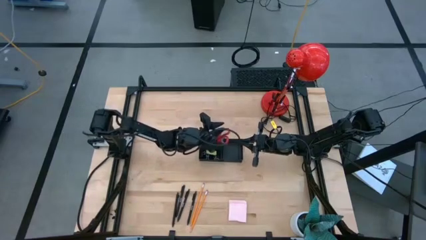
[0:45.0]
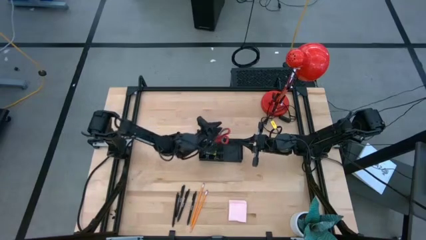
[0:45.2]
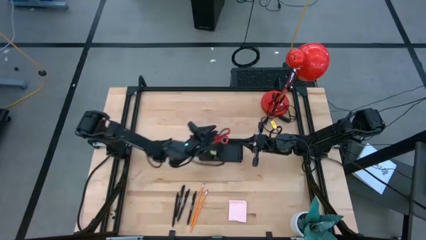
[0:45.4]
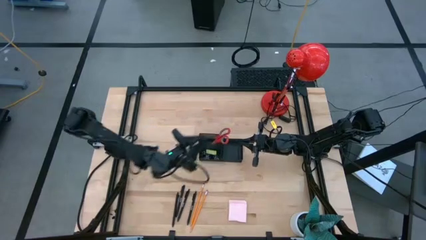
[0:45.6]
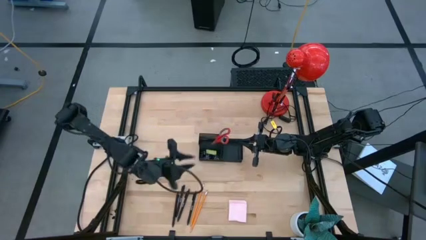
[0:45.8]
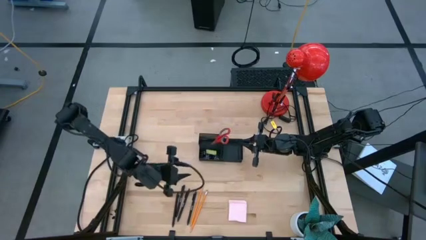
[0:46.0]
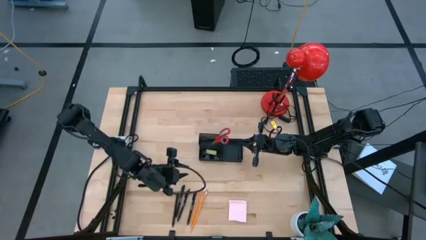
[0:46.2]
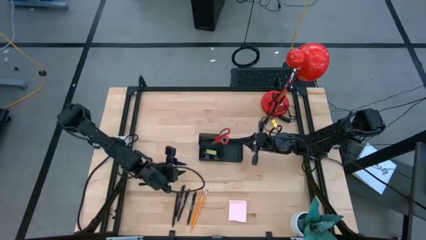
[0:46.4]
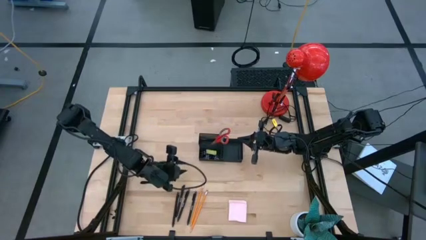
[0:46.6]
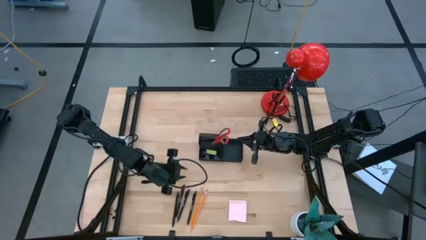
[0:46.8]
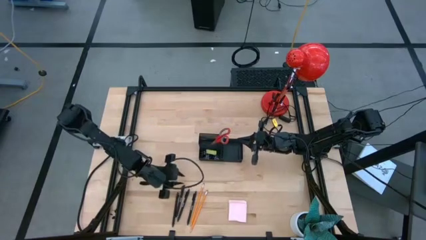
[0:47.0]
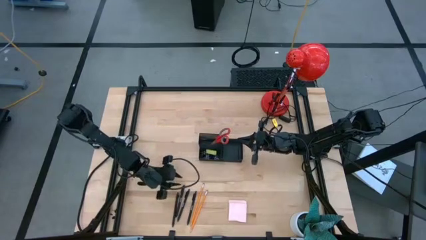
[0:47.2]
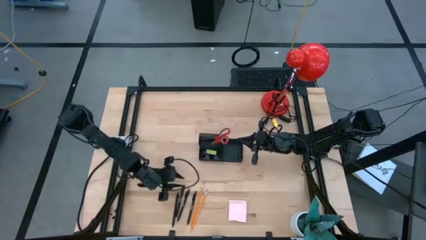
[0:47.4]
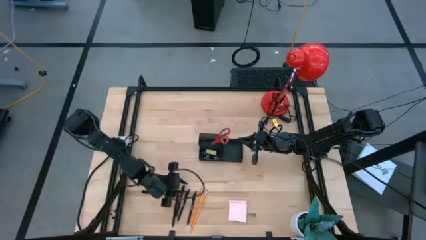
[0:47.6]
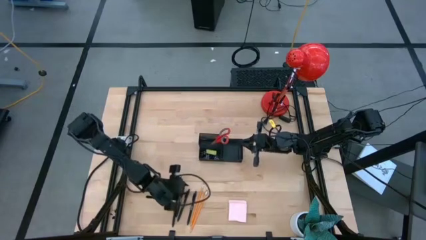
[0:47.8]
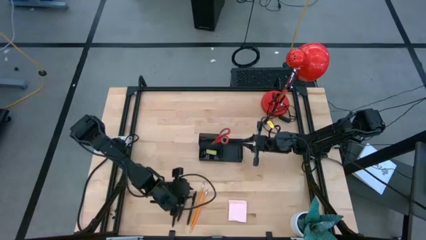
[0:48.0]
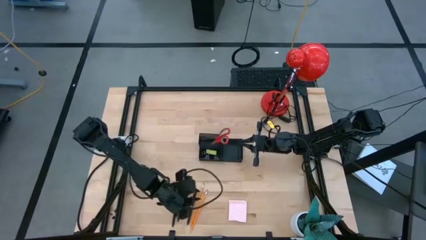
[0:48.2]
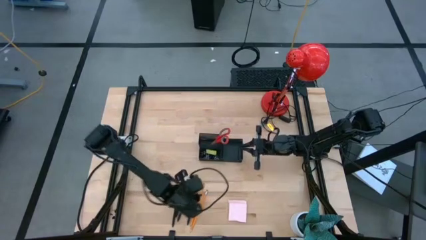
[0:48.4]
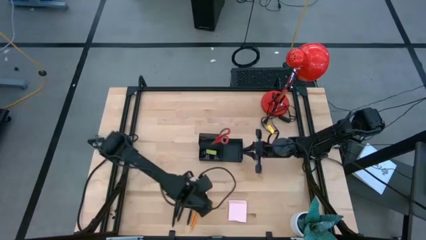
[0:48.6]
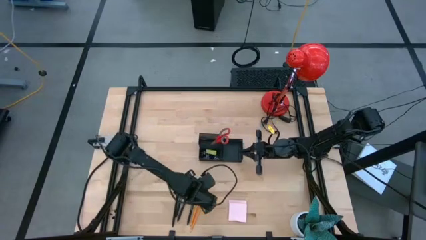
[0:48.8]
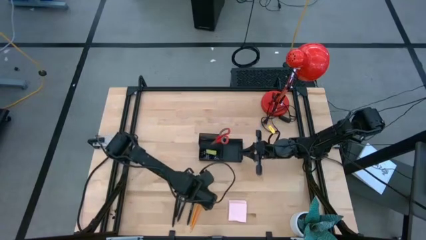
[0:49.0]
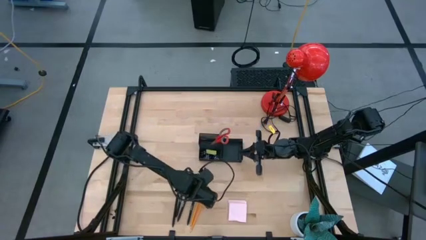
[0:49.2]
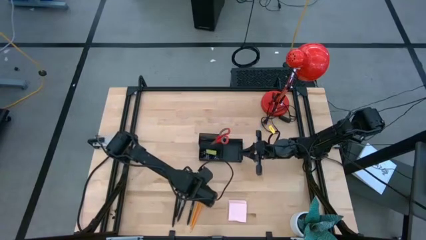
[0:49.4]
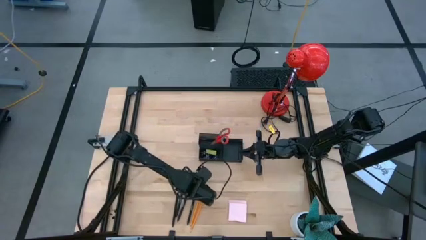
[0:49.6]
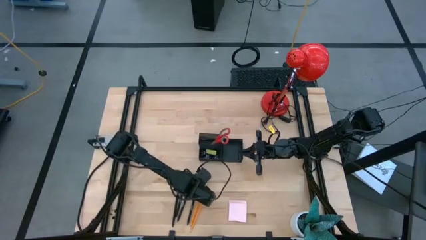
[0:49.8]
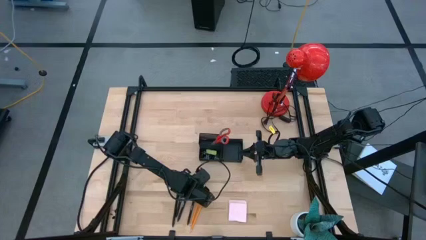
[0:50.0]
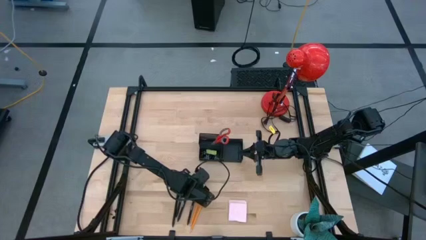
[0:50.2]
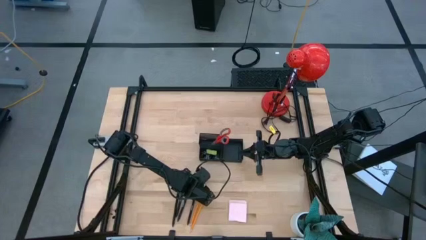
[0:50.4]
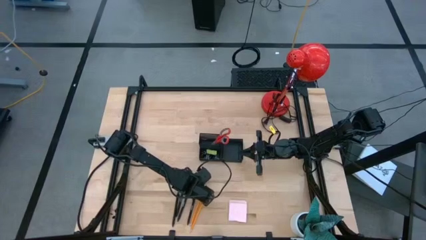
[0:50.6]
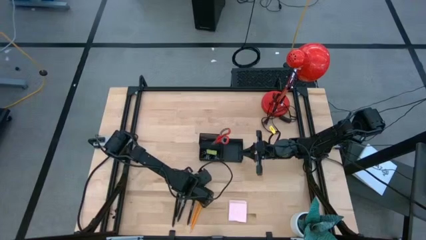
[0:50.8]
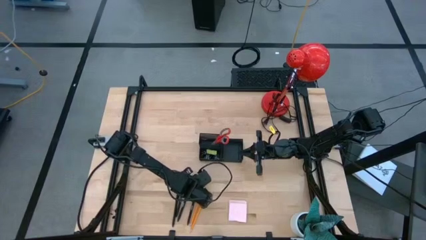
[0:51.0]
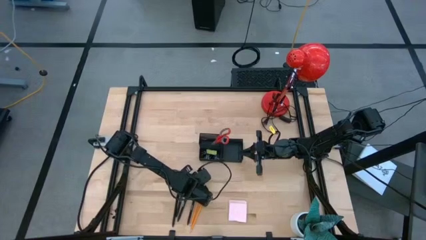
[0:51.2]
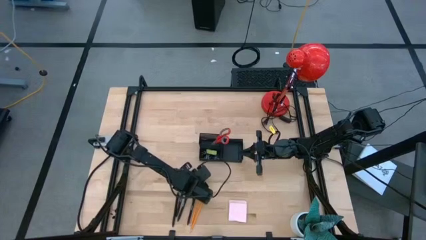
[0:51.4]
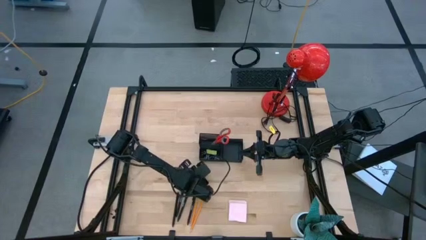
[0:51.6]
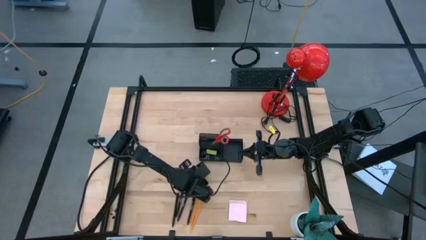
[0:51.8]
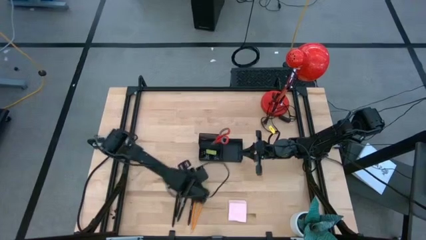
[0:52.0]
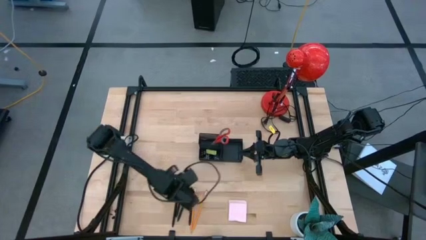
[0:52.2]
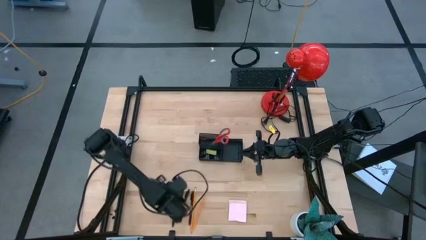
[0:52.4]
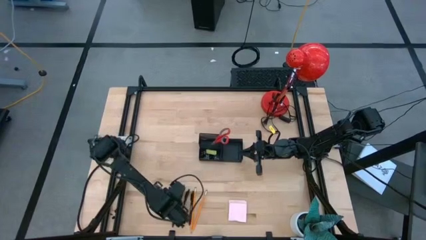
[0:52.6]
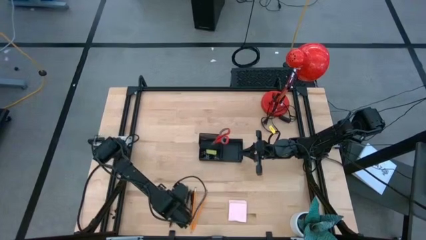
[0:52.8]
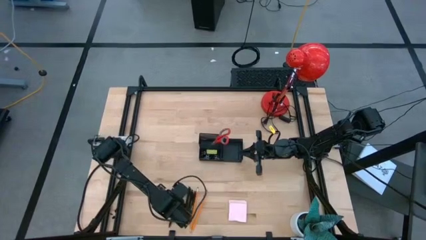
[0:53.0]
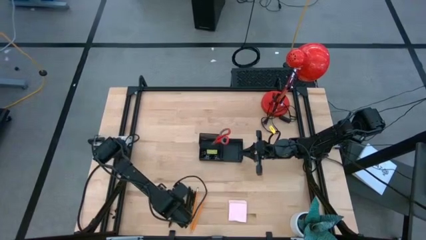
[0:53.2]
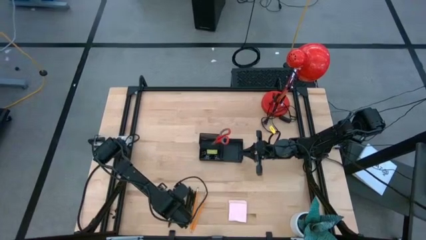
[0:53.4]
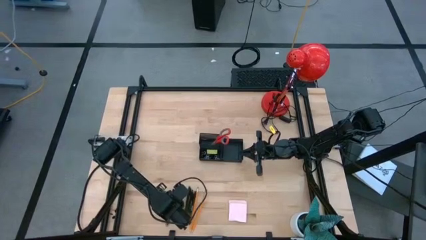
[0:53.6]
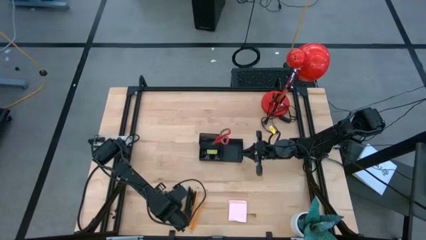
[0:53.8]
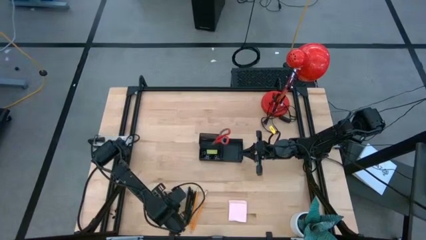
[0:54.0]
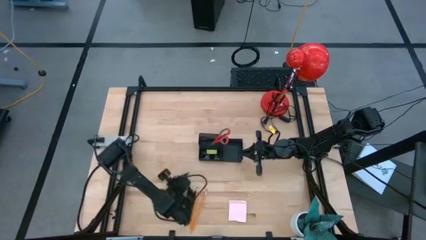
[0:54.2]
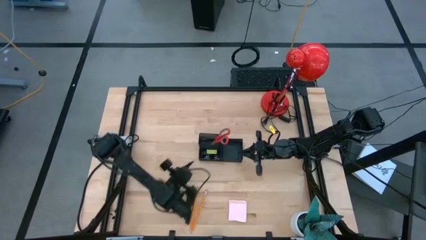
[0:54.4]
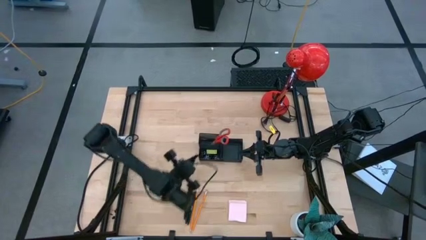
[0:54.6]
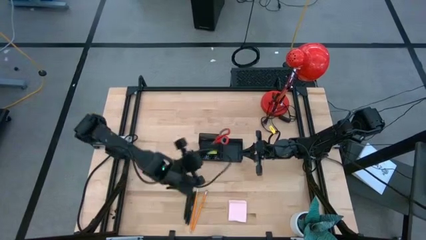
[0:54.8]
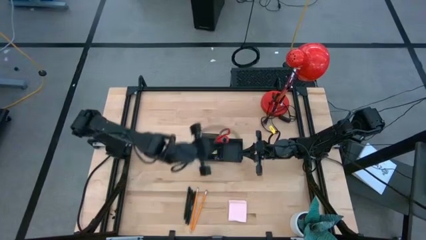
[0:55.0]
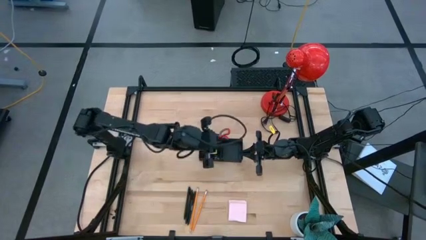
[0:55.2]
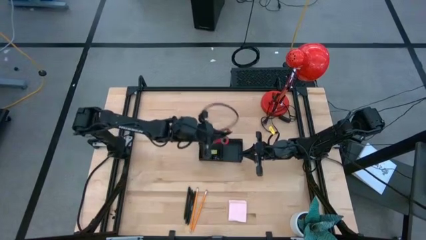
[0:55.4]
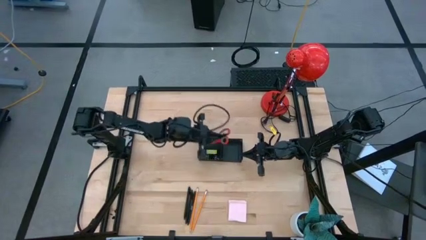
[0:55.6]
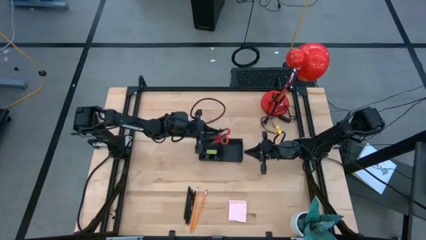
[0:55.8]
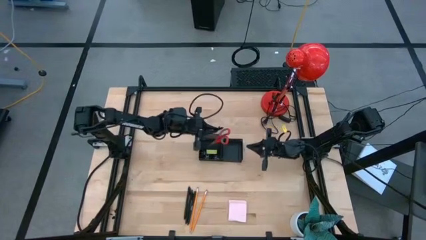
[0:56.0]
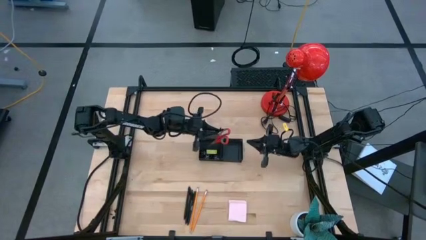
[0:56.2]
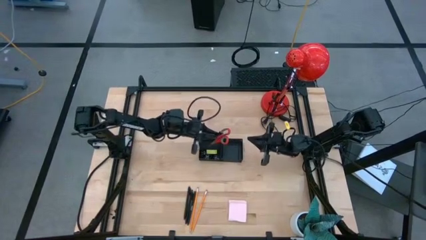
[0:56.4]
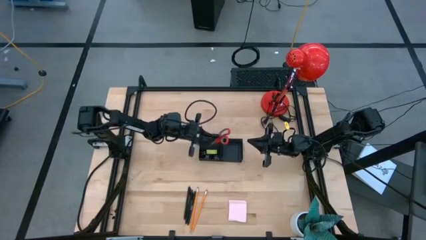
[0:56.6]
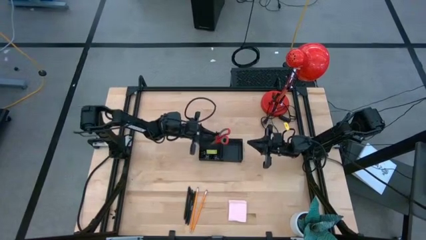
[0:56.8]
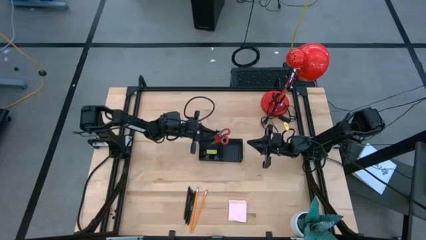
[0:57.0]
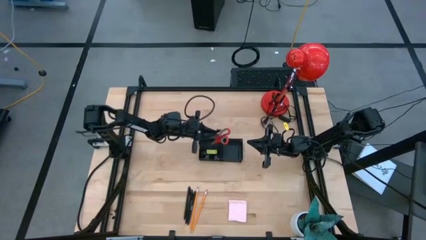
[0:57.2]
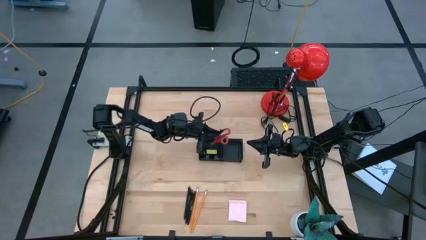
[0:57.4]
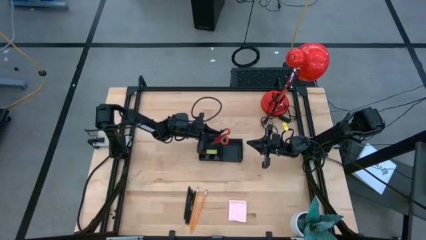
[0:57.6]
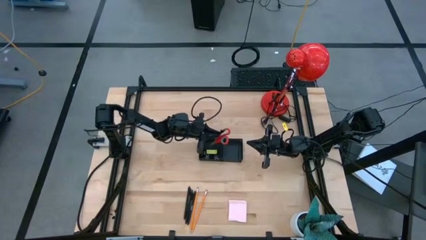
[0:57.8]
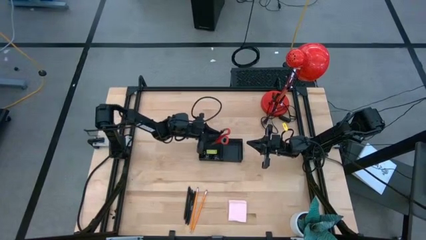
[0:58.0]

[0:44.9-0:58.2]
Task: Pick and place office supplies into organizer
Put the black pen into the black desk organizer

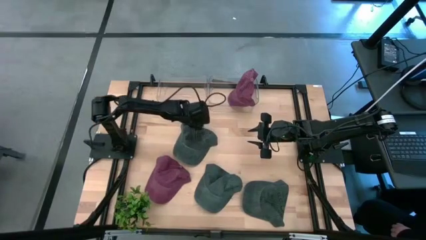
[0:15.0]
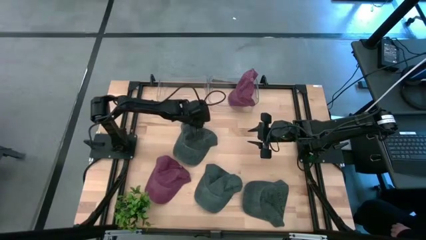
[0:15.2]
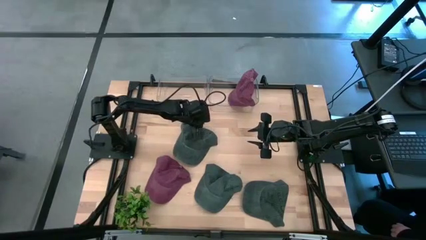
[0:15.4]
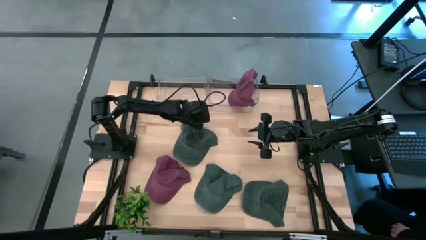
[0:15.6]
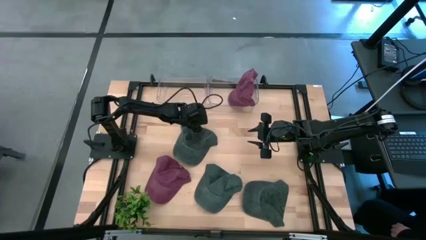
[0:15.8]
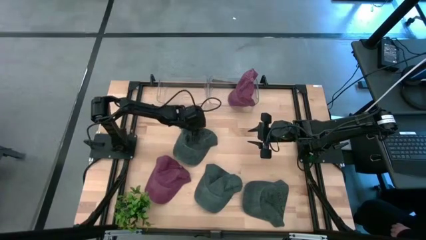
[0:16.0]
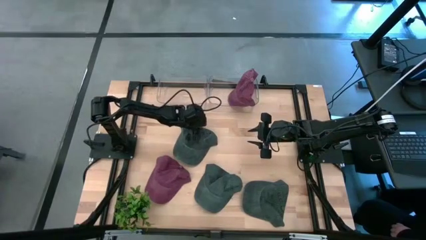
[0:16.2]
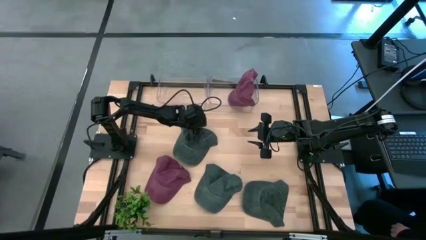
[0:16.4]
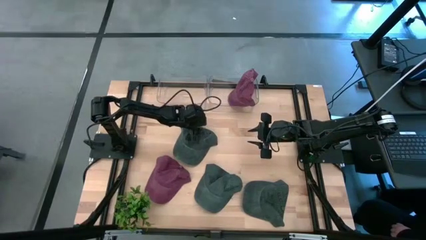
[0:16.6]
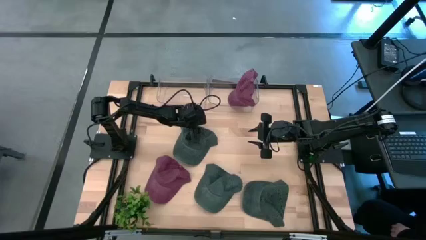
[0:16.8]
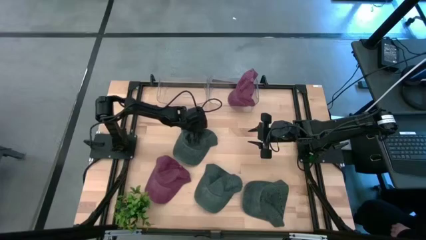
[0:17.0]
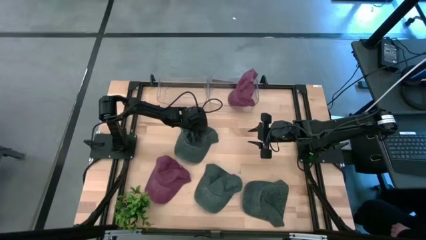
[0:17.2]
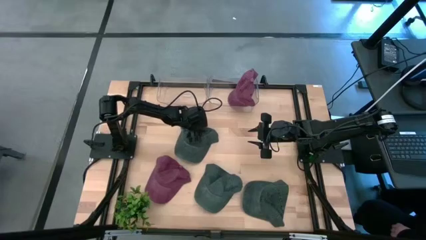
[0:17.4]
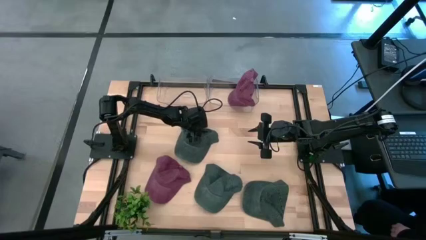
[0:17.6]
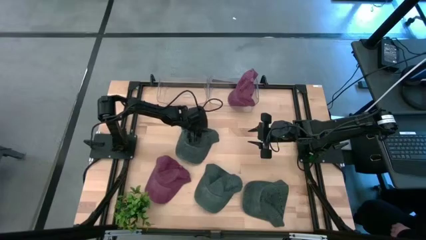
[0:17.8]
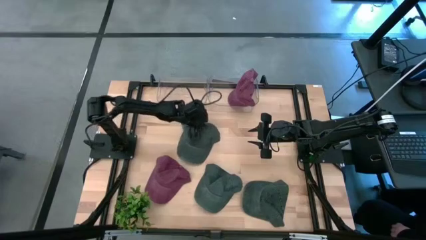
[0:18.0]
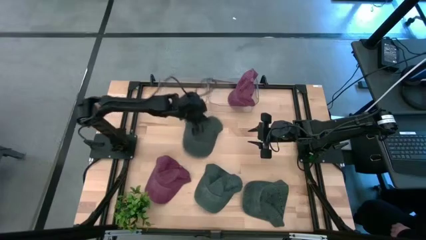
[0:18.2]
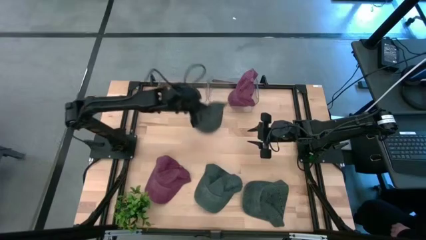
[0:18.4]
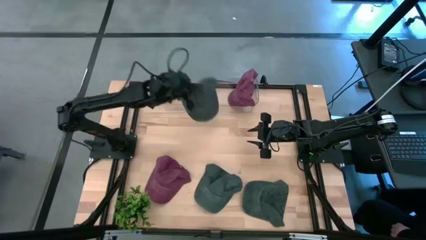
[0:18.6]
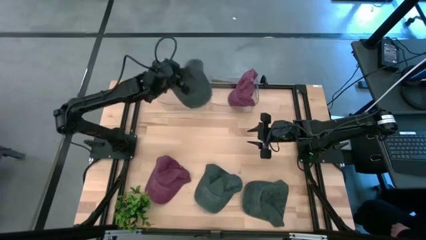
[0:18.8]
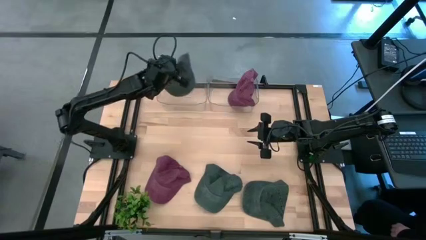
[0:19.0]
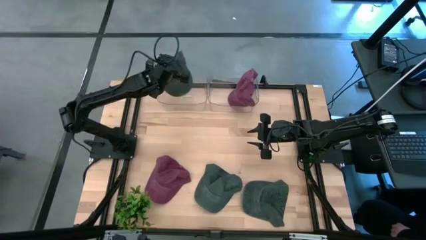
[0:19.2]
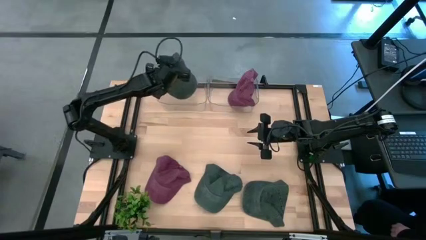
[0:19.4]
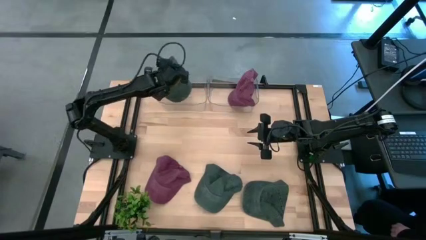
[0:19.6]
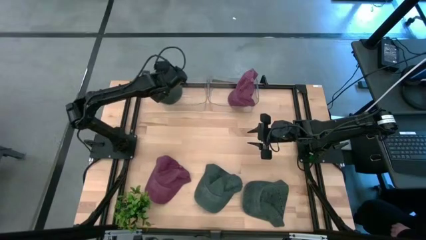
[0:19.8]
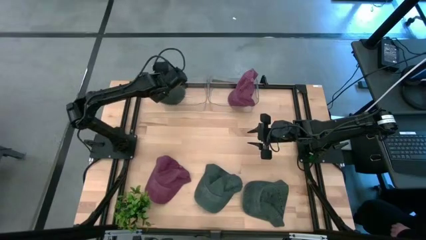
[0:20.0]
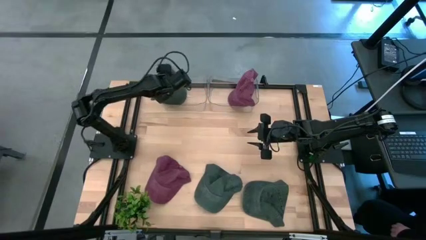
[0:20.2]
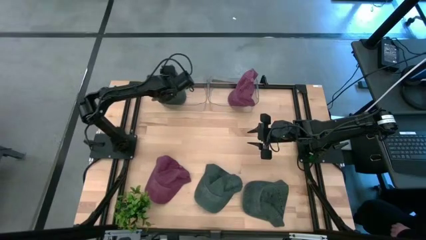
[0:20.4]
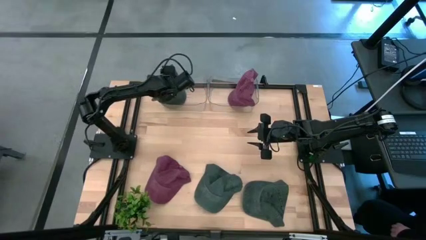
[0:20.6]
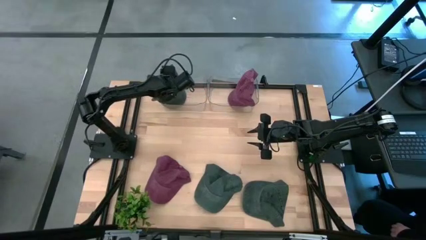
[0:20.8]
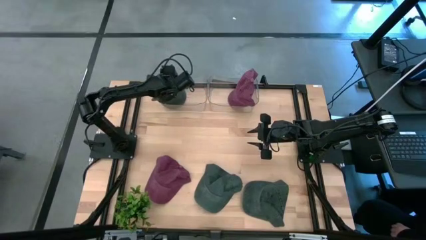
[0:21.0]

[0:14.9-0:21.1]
Task: Pick & Place hat
Put the top left black cap into the left transparent bin
